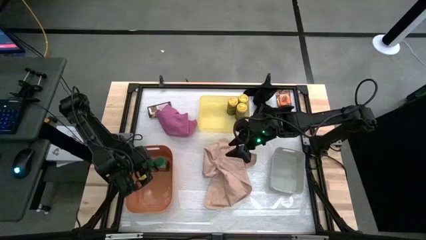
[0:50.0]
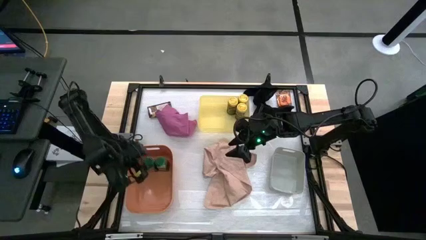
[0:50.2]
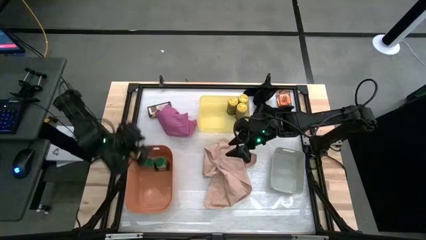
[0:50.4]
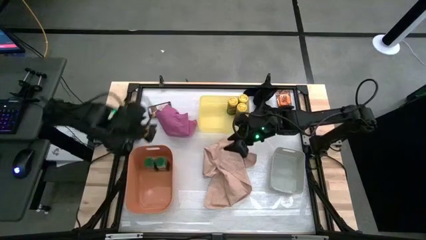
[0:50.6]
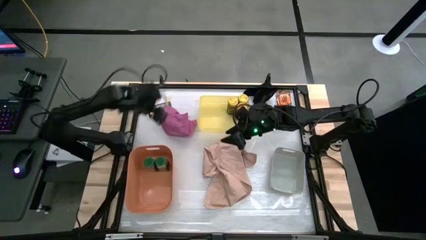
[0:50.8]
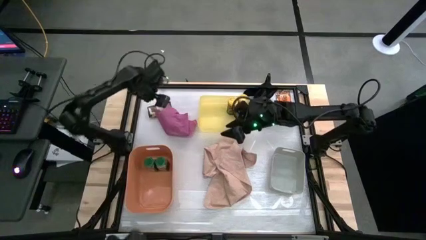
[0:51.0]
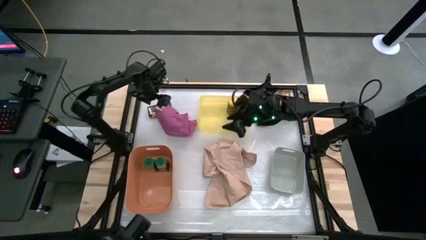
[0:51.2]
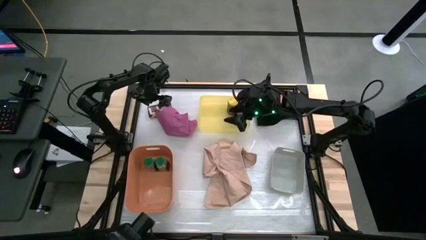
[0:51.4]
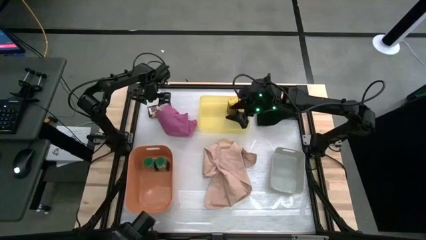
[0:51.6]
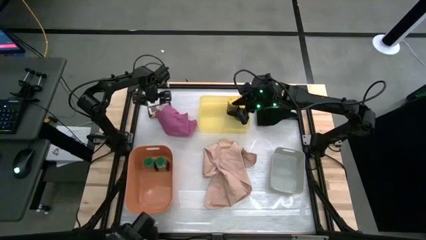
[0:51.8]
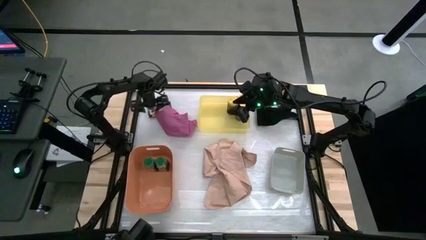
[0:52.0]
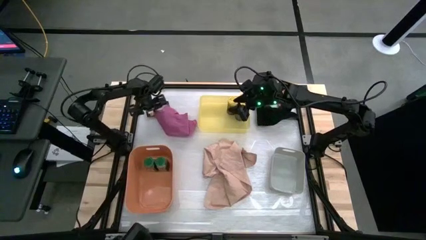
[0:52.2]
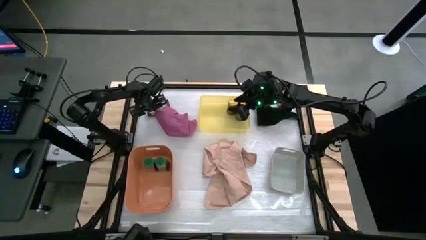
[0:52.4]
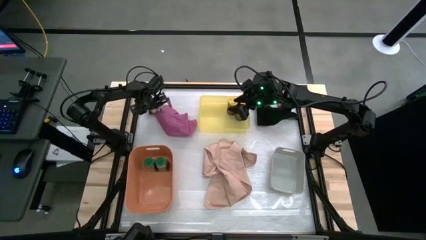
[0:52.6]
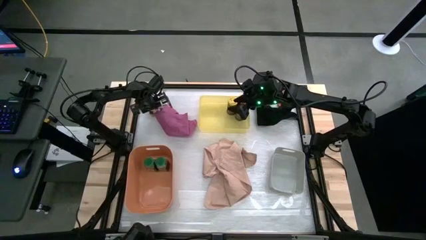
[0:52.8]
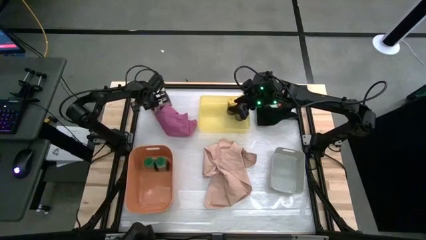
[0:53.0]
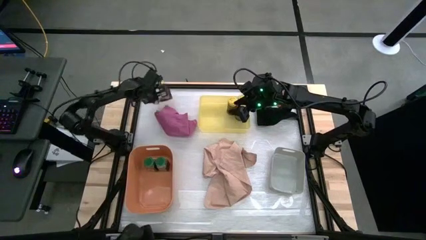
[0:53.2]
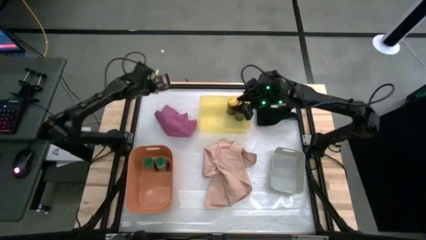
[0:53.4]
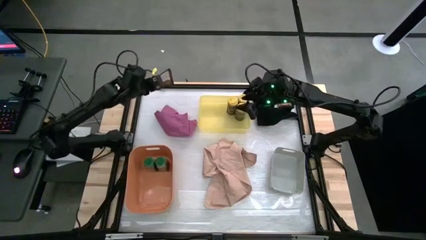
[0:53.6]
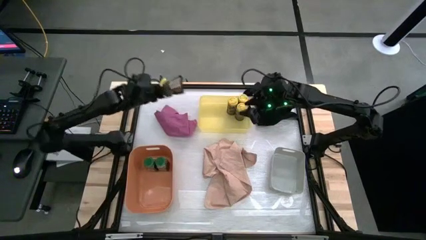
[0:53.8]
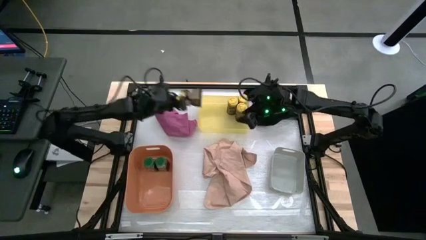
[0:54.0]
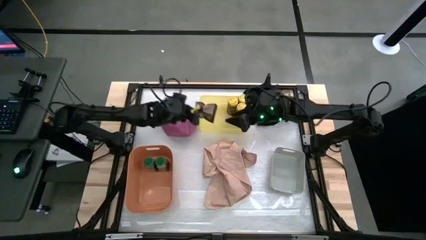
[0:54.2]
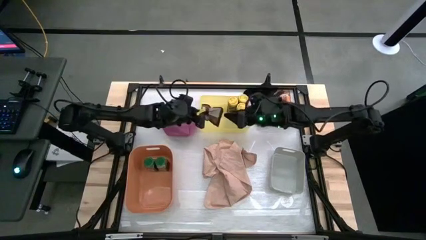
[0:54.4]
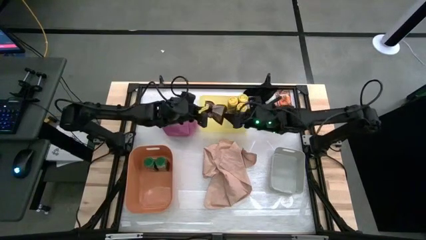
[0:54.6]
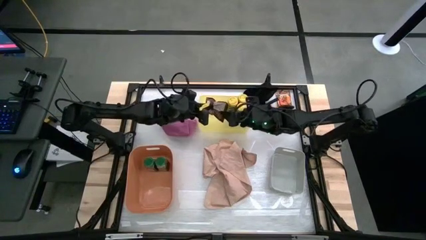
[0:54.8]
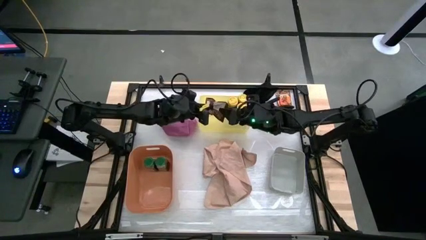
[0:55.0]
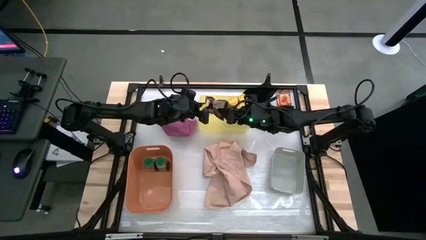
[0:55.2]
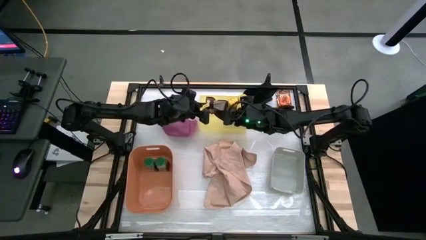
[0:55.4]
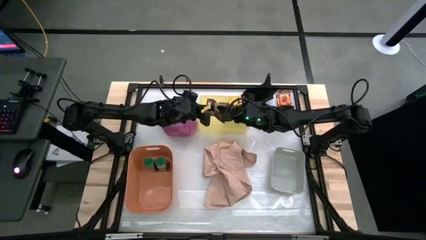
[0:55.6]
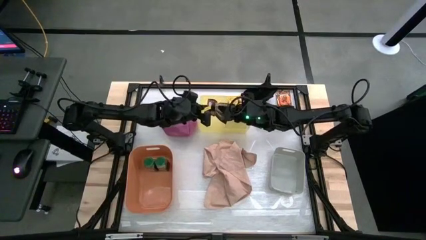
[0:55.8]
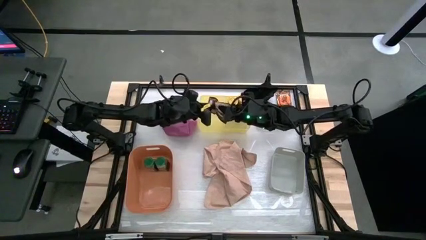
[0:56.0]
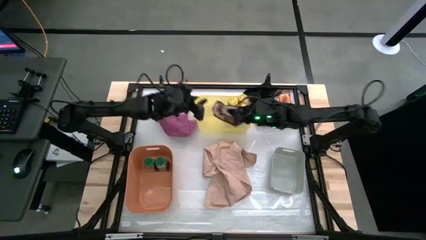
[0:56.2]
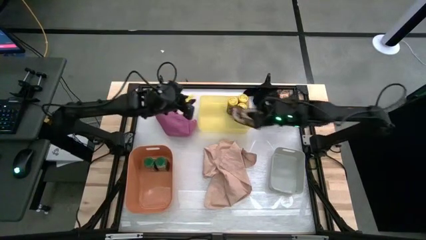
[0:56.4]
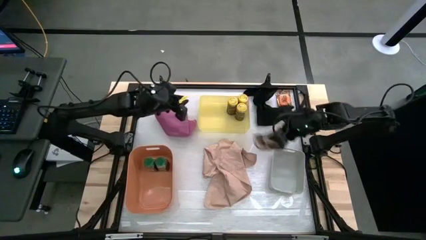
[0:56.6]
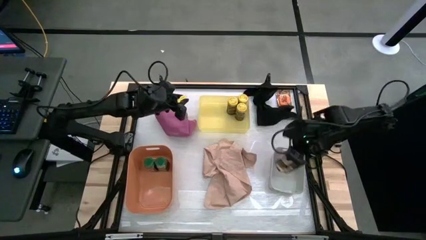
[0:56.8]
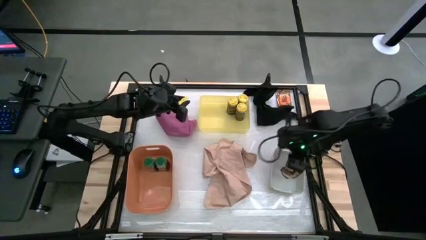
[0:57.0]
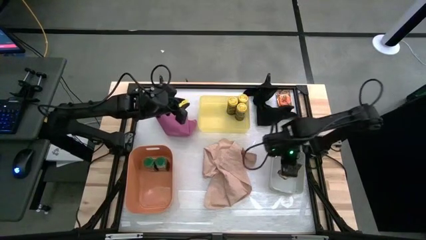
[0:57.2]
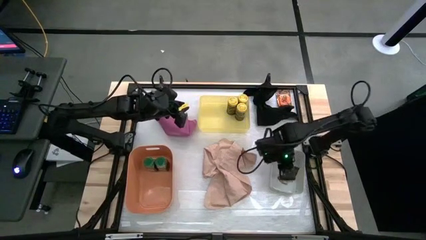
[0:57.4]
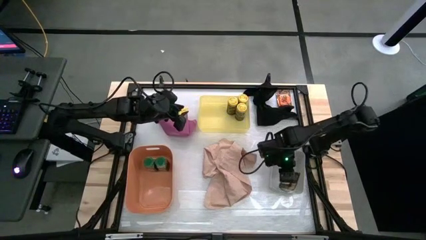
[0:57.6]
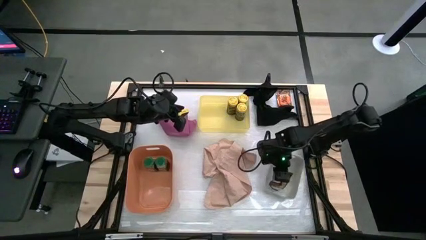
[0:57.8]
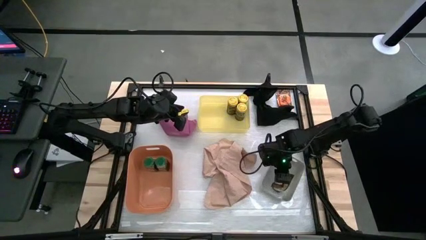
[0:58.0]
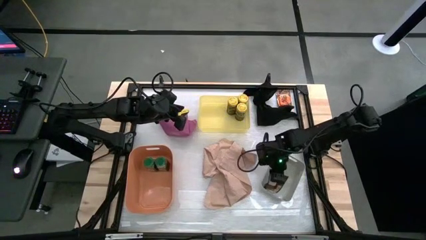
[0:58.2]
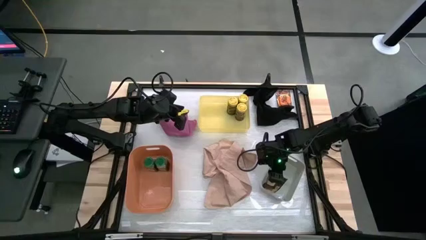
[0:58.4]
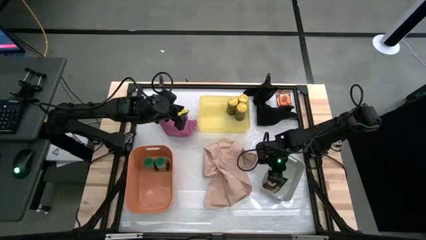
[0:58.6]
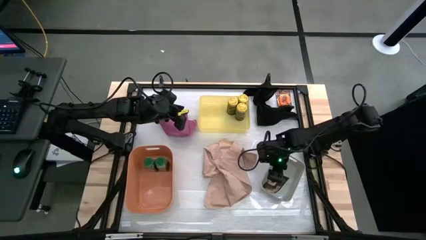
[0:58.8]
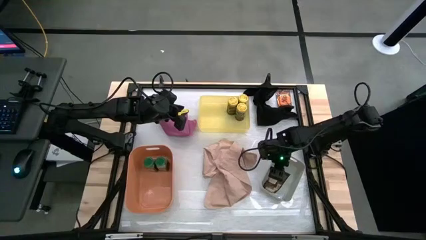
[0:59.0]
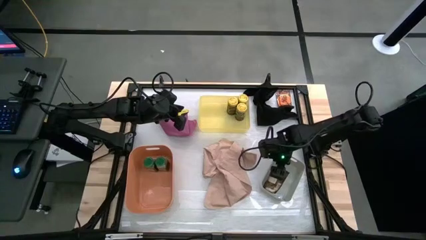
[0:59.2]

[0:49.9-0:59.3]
Task: Sort spices by type
Put the left orange seasoning pack into the white bin

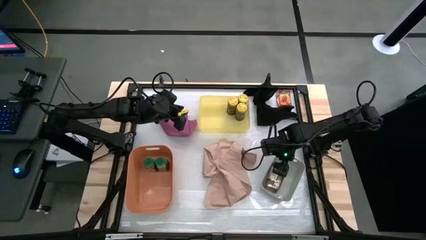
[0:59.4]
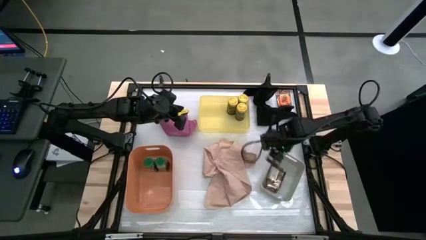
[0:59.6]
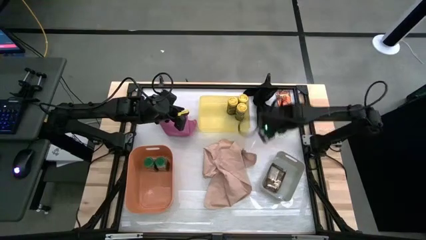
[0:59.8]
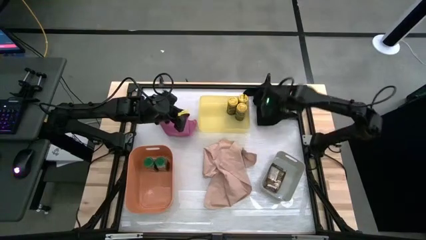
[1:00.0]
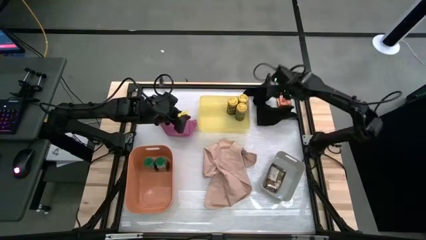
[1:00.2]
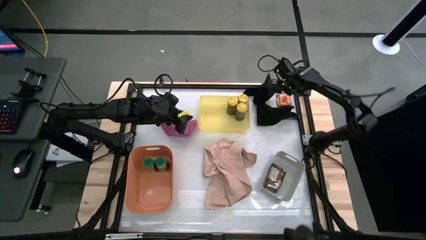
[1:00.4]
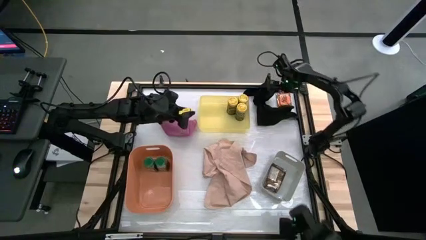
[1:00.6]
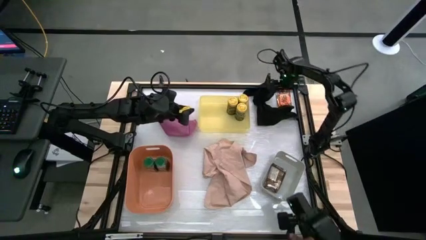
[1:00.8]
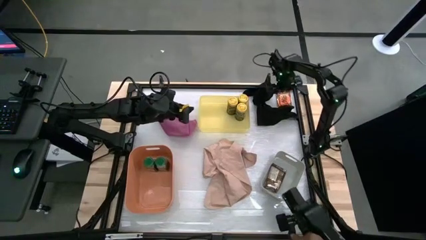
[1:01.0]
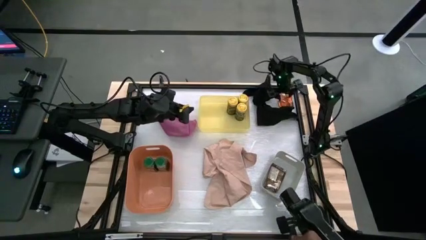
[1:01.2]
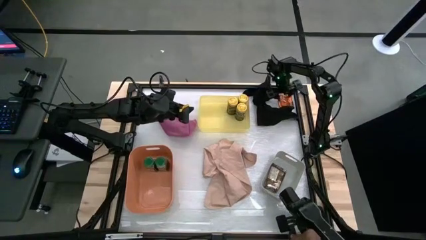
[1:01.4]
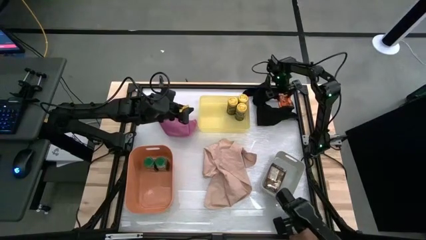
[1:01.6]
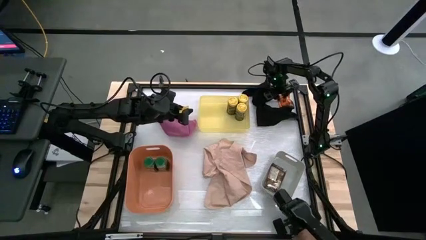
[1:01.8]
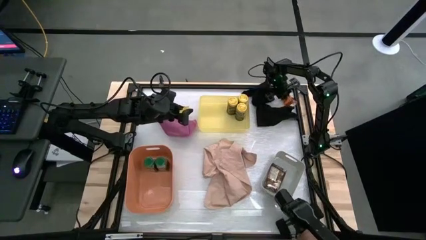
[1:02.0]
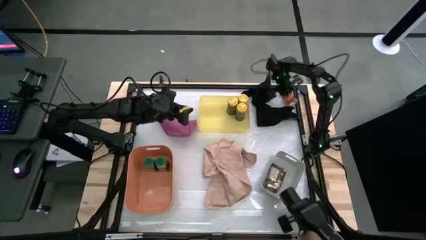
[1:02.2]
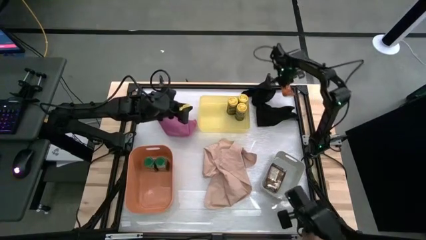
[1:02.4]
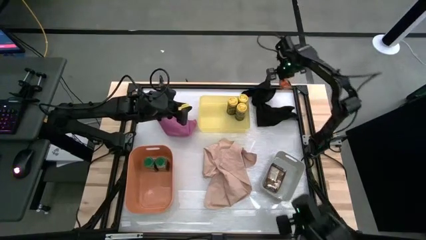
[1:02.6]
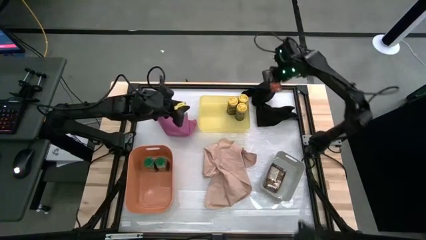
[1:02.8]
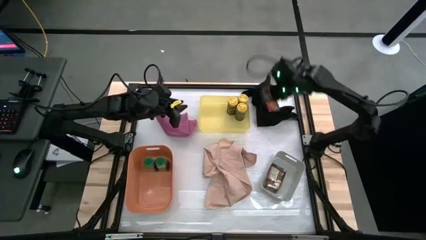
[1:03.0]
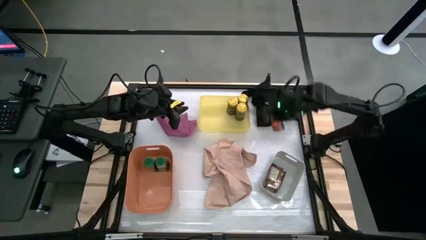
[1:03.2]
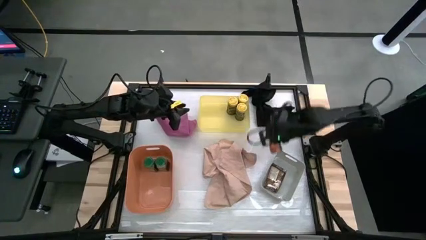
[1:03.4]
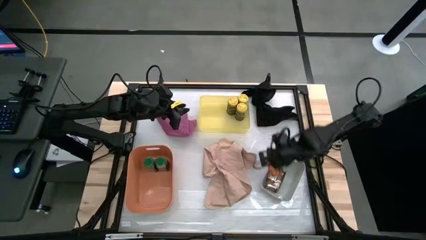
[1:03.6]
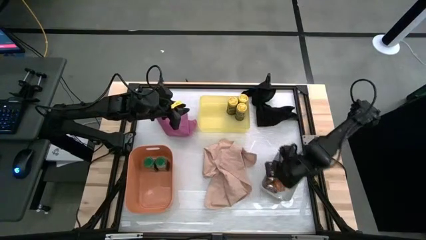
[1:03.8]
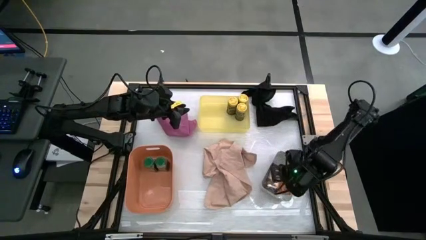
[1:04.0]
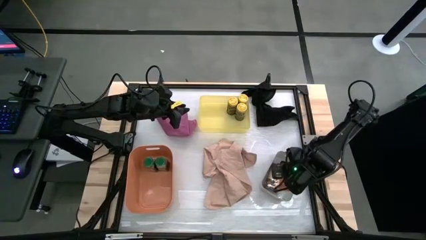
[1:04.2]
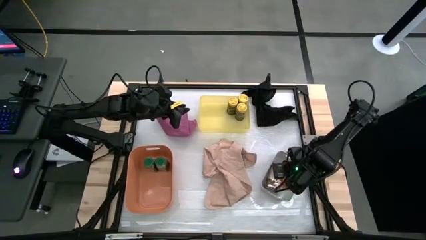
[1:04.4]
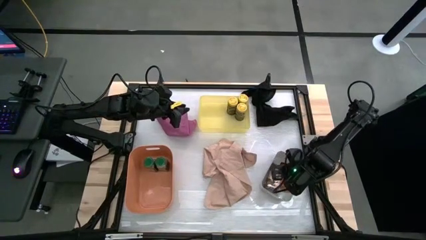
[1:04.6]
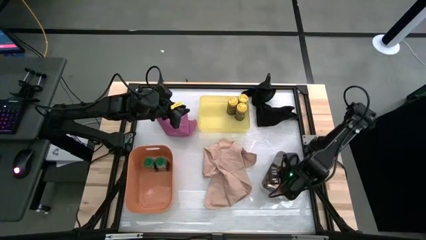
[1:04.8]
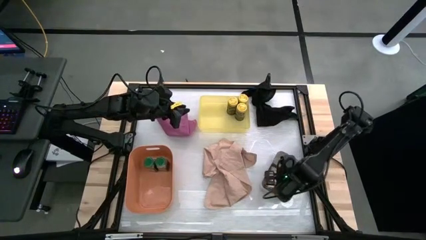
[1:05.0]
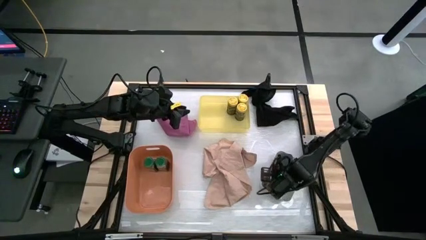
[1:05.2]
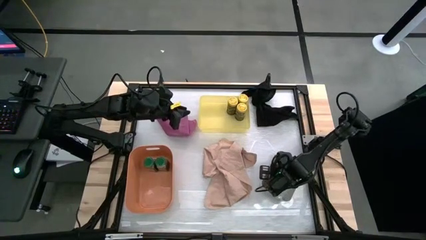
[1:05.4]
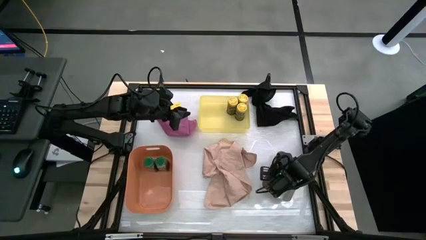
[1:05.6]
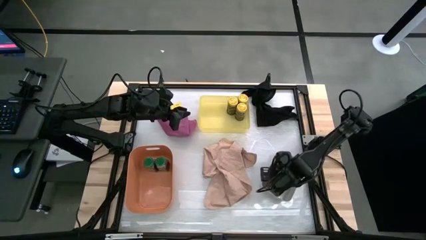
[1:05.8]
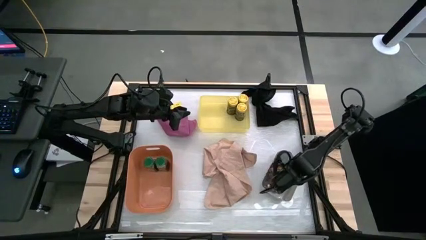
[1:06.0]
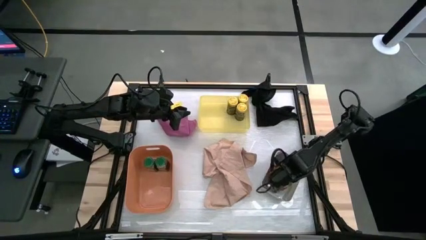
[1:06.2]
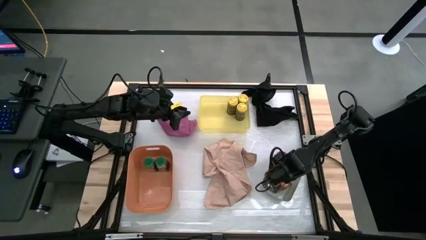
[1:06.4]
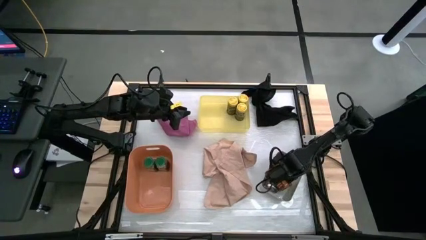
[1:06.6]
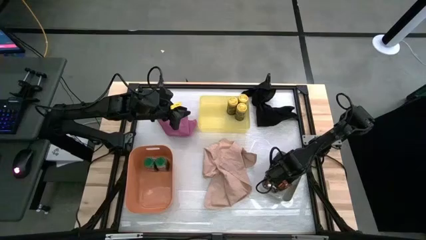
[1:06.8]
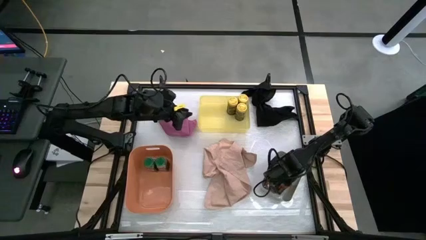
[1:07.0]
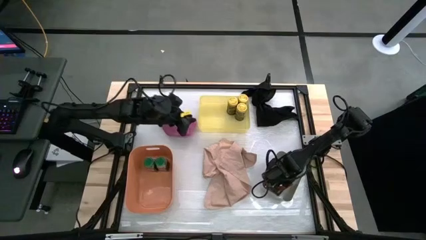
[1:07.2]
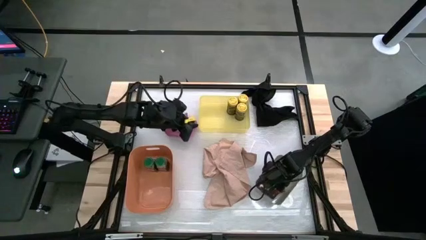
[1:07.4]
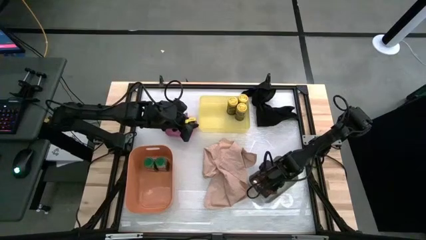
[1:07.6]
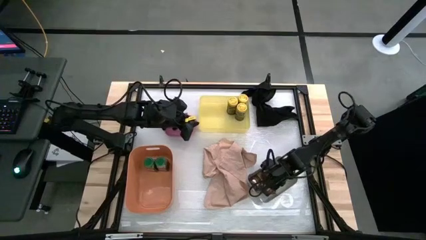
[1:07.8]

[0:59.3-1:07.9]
Put the orange seasoning bag into the white bin
